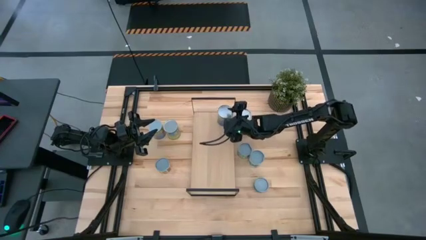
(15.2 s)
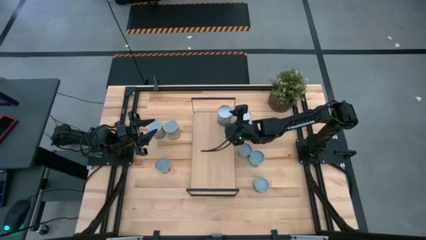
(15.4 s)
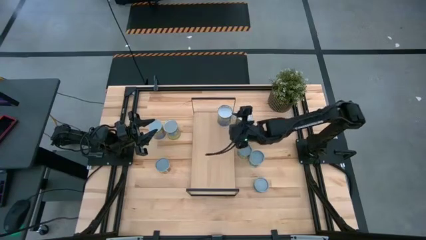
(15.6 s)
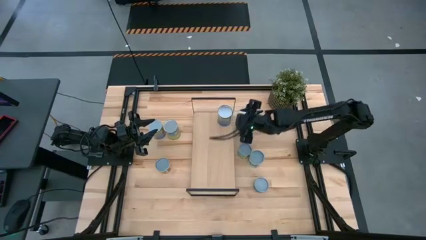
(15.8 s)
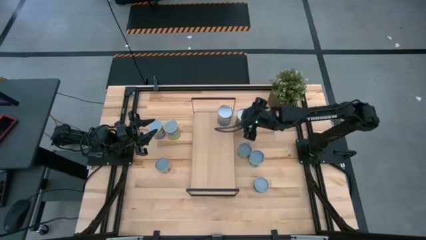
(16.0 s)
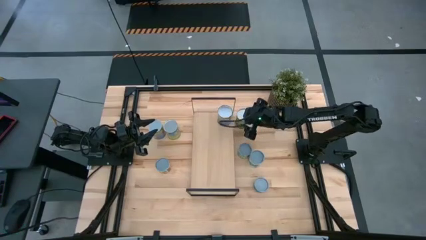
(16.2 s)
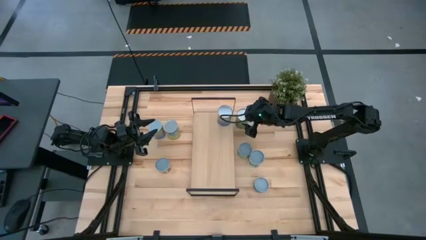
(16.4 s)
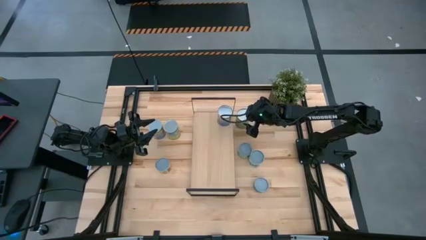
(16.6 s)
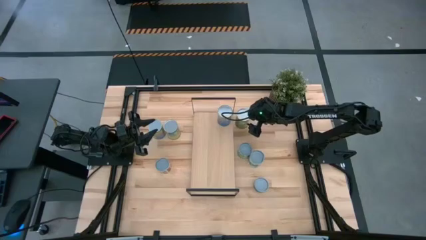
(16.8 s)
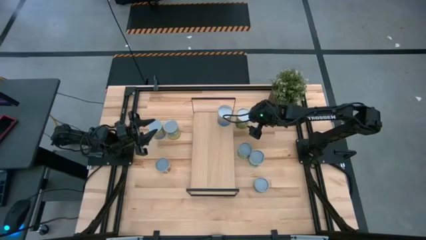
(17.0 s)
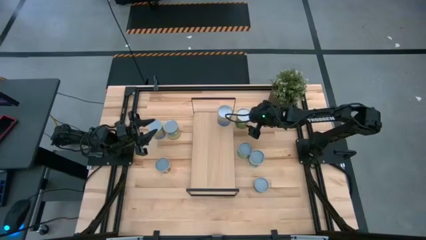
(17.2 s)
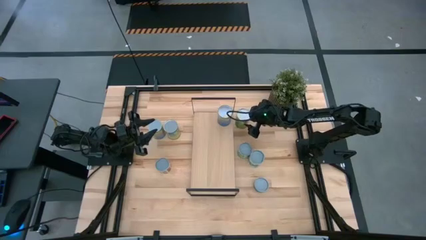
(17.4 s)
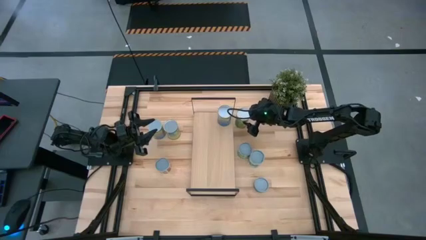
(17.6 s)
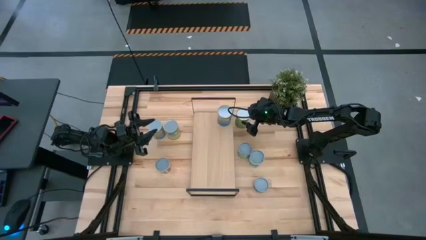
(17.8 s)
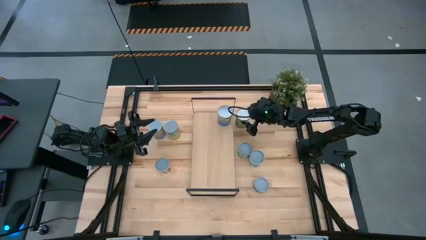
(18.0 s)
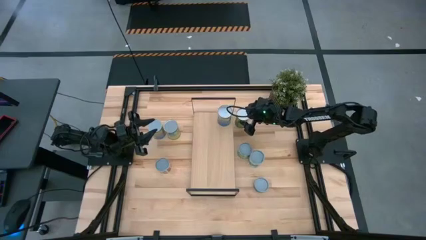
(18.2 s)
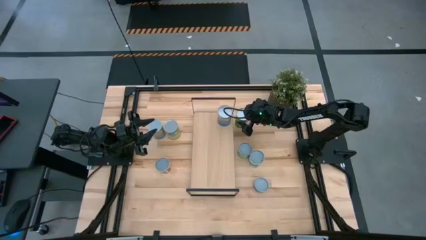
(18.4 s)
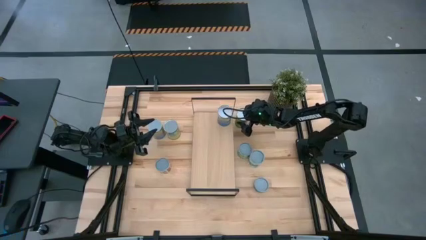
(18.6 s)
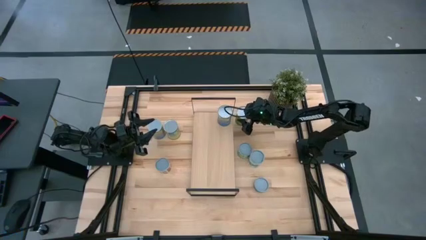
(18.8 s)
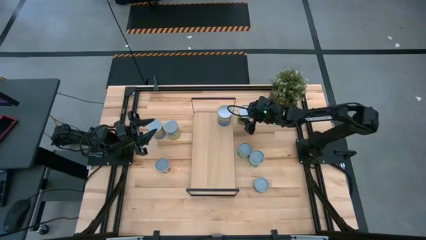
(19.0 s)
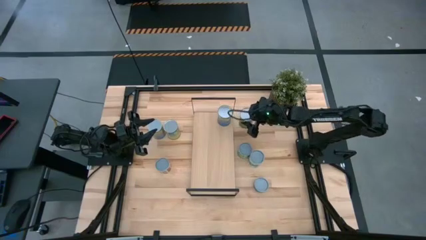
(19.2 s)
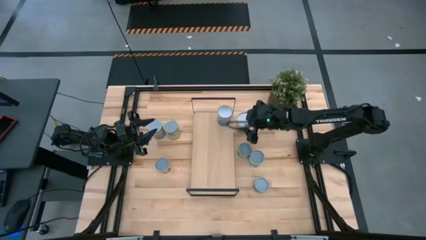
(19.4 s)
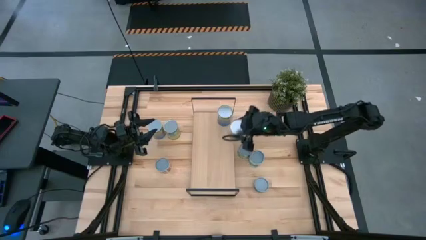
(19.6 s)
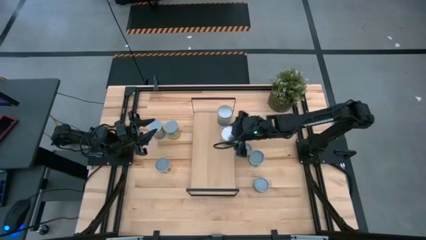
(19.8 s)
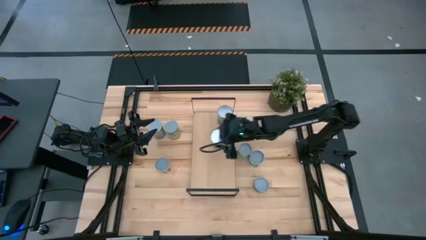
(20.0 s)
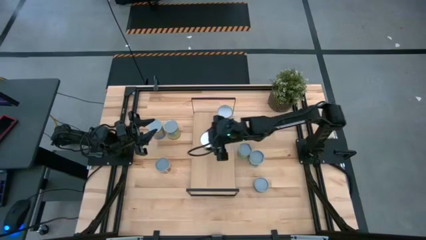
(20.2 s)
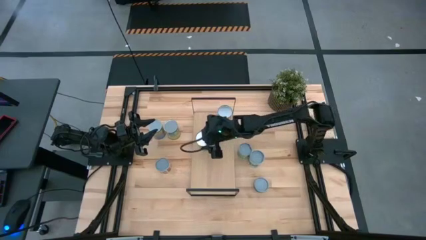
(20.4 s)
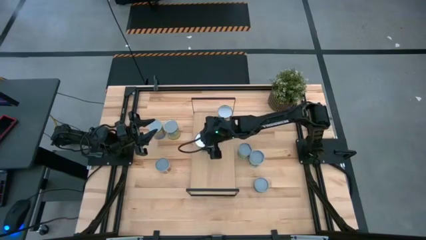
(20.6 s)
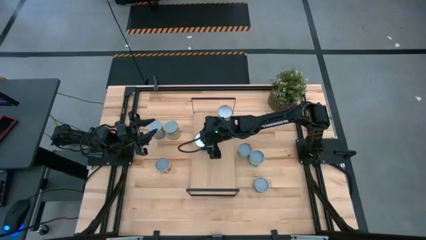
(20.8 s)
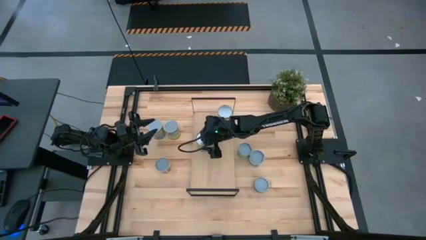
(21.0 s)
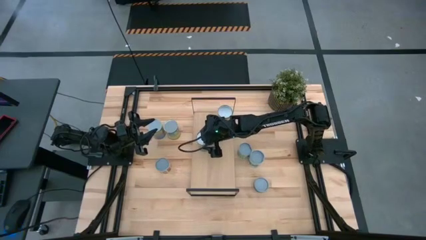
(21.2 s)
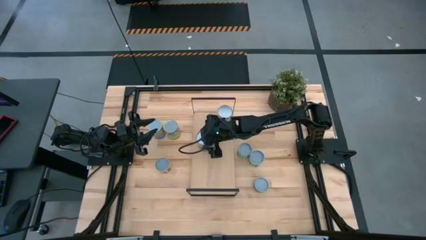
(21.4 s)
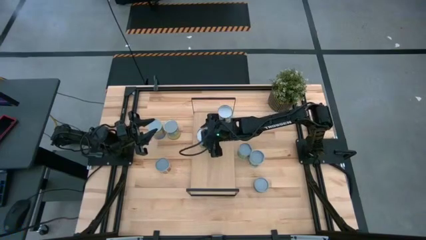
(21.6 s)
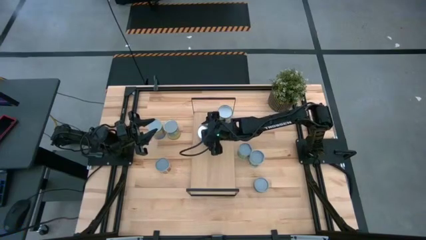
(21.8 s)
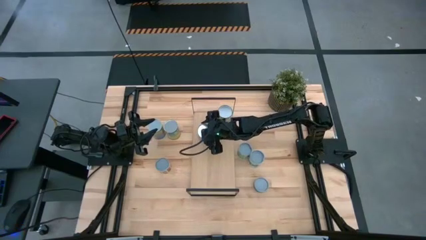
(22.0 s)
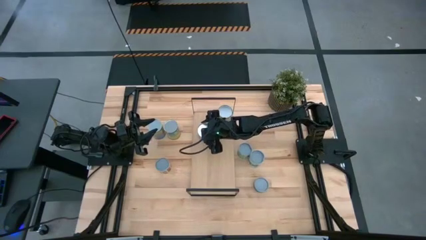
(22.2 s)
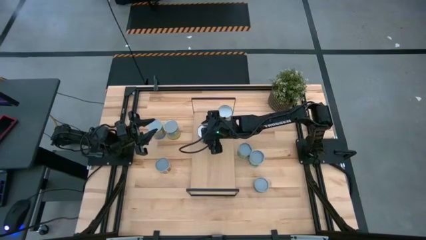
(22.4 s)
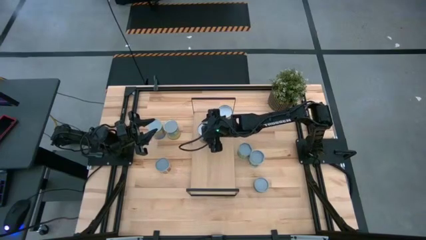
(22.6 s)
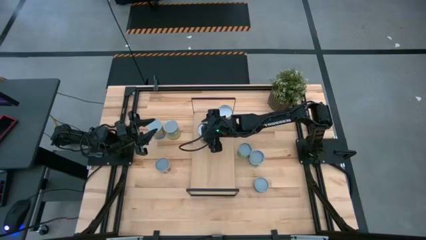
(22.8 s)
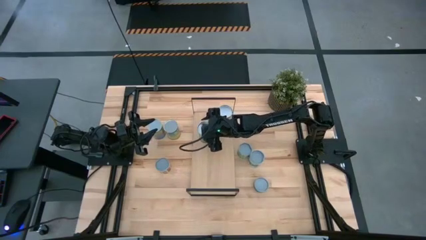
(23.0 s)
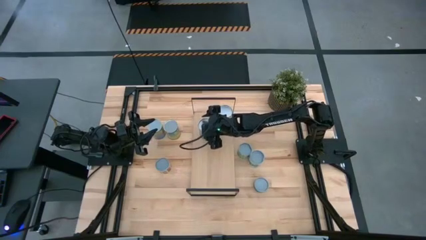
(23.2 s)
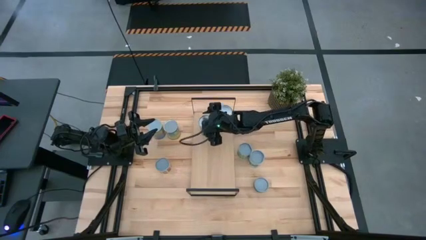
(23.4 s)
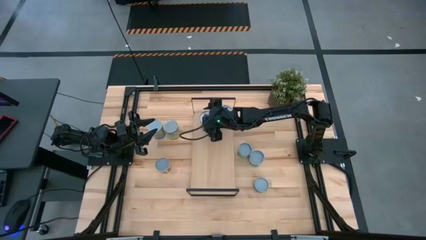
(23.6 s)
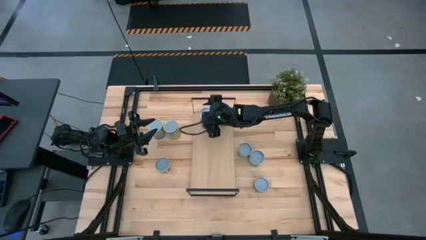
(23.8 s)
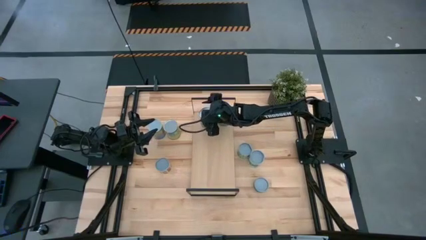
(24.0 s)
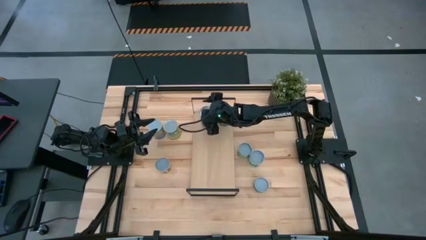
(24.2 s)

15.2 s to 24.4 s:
Task: Pick and place cans onto a shelf
Put the canned oranges on the shelf

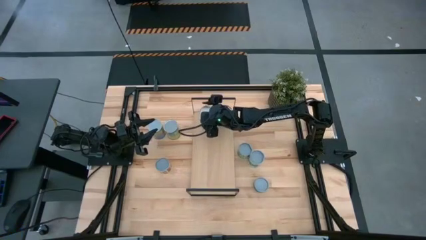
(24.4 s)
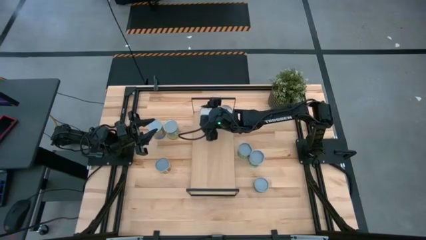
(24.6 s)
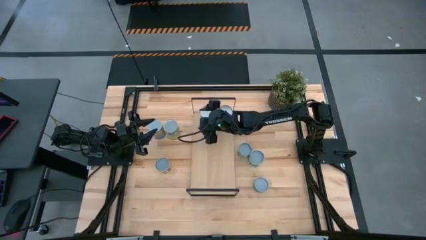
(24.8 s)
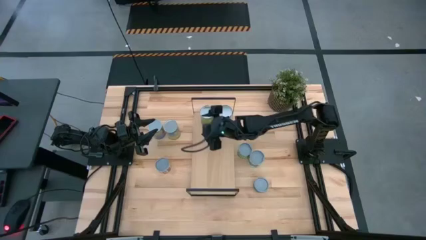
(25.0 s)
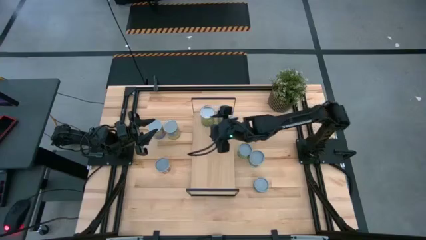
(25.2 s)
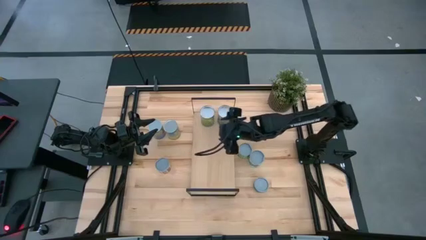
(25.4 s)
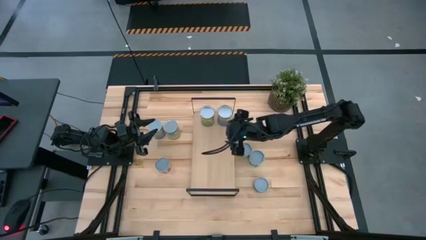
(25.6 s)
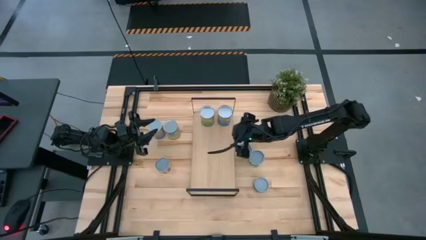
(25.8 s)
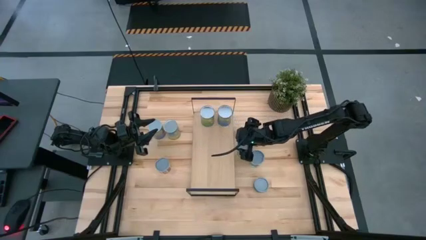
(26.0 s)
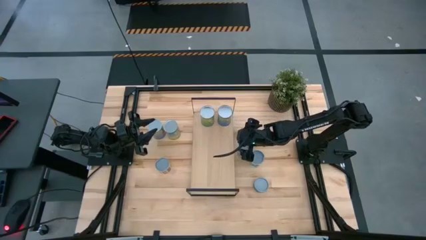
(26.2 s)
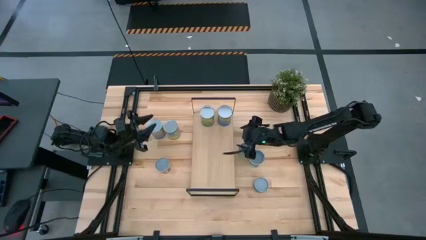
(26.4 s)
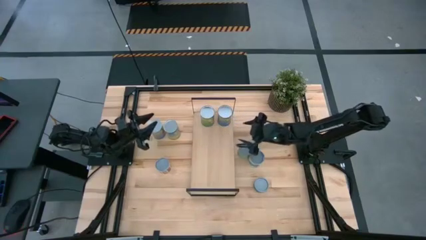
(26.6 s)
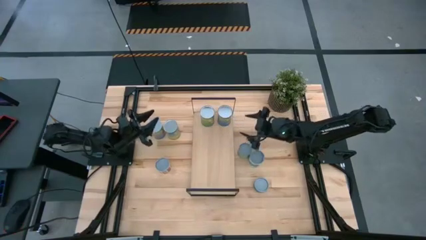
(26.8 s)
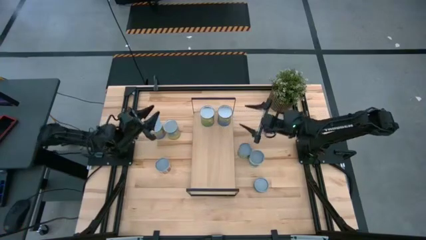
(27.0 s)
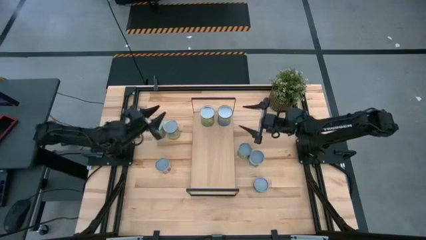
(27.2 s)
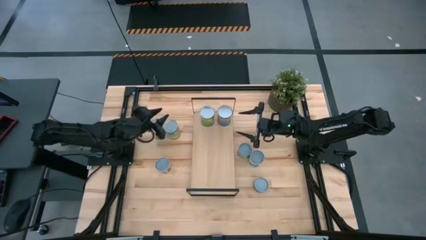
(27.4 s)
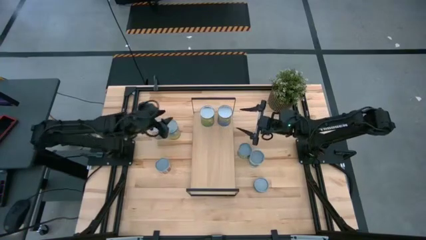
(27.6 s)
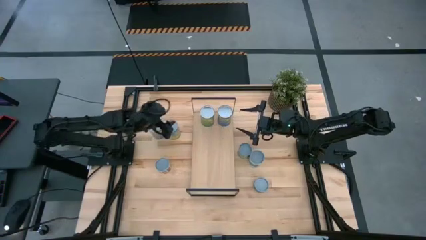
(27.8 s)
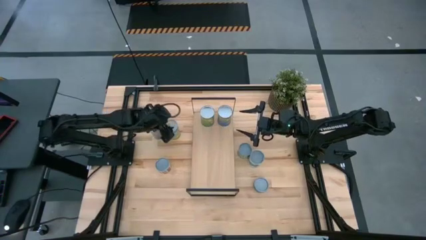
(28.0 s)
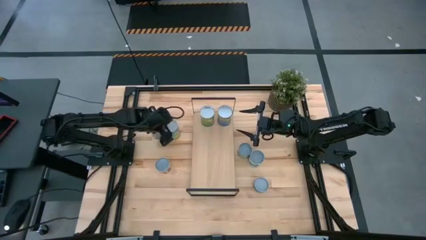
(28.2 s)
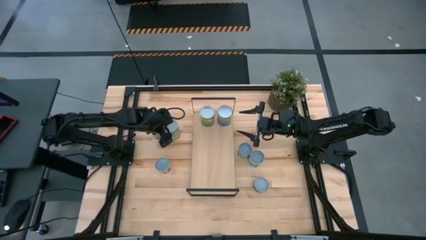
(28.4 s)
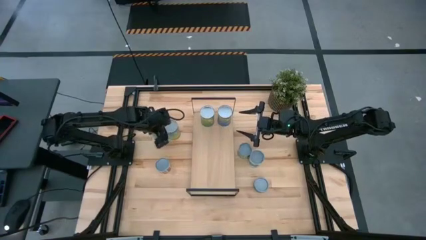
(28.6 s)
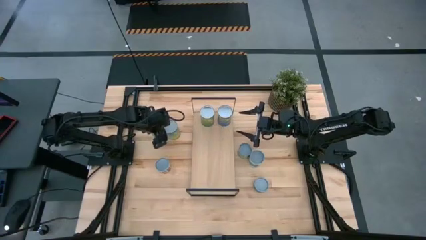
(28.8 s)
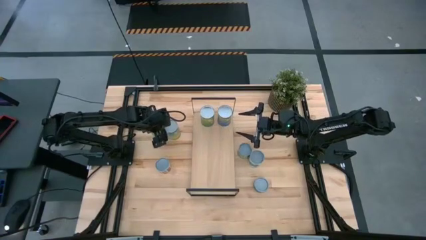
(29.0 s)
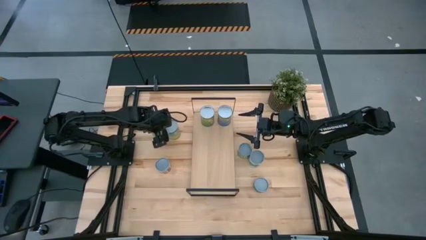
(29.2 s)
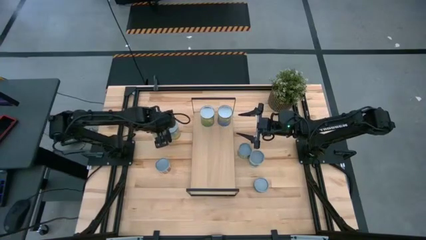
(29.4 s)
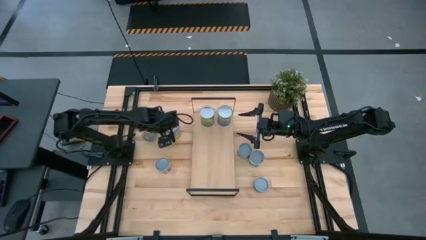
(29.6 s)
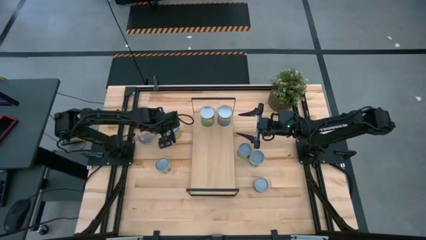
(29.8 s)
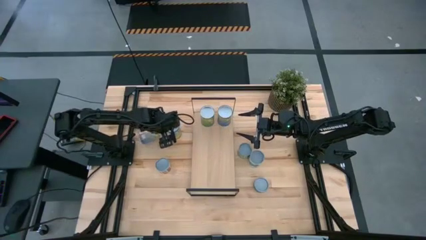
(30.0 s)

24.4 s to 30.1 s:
Put the canned peaches on the shelf
